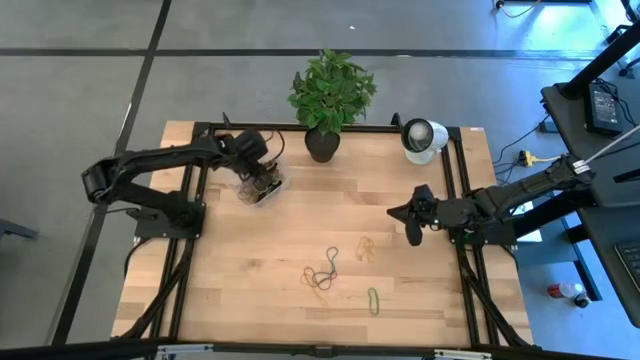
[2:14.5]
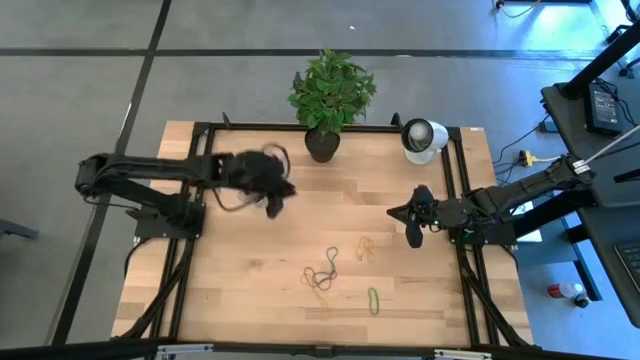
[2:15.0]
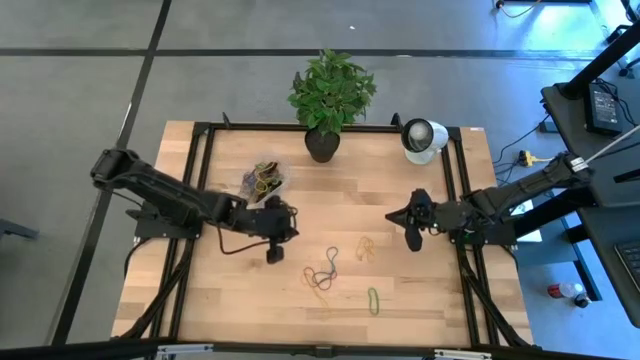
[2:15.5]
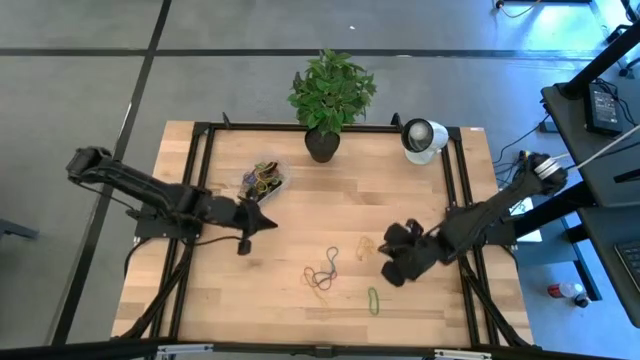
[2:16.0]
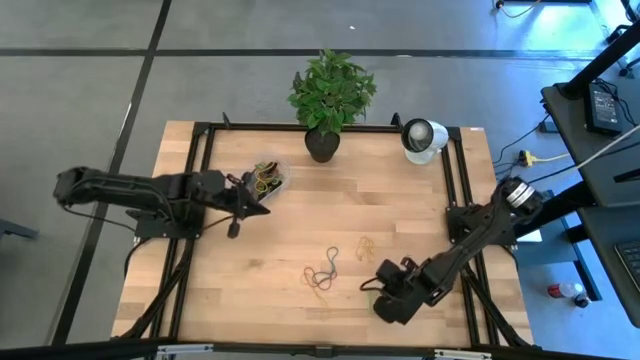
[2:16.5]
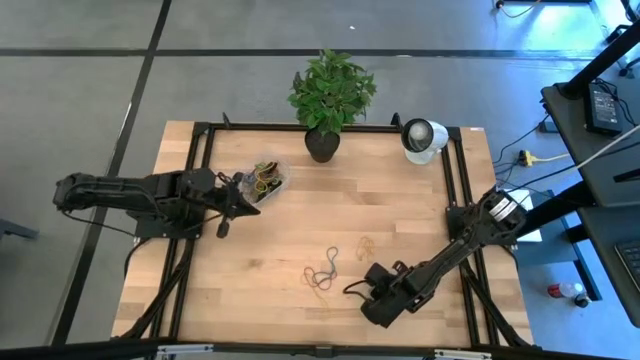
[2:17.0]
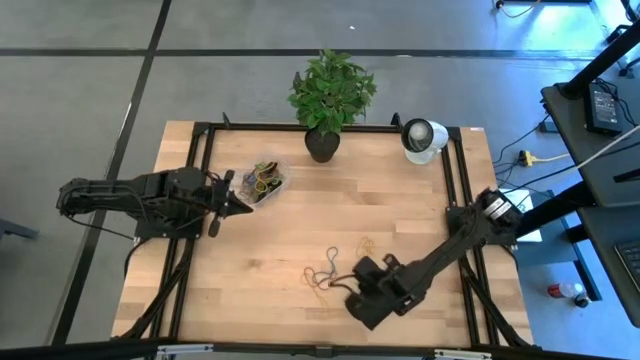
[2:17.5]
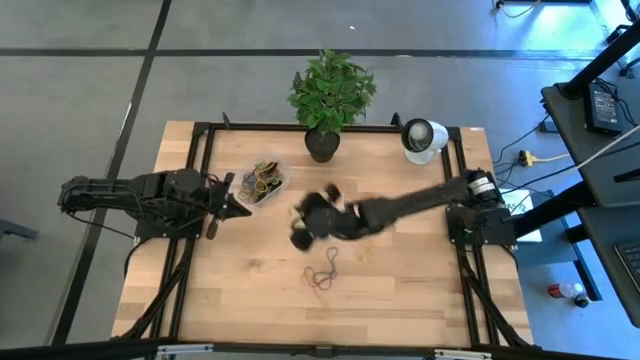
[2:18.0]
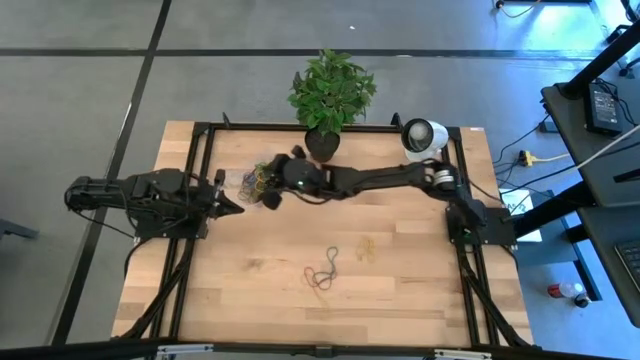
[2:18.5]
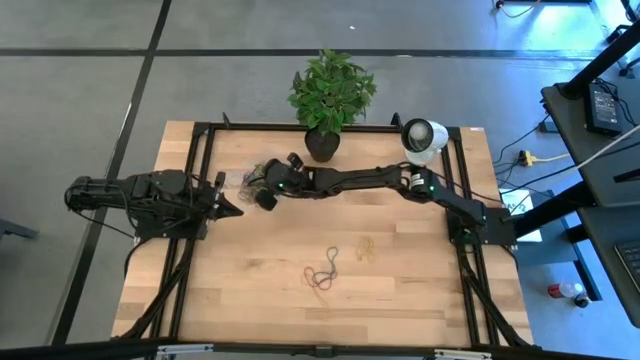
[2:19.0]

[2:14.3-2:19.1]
Task: Pick and place rubber bands into bin
Put the green rubber band into the transparent bin

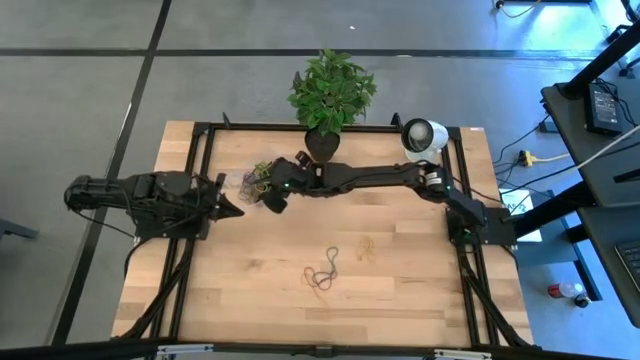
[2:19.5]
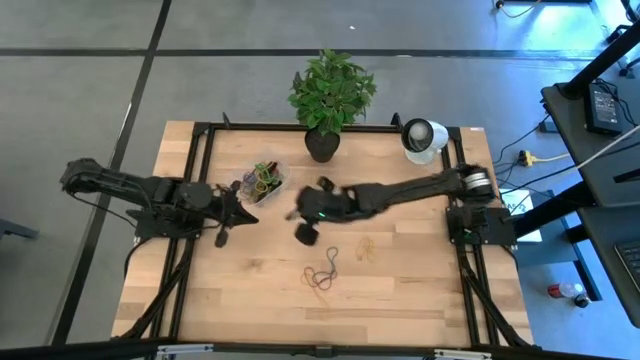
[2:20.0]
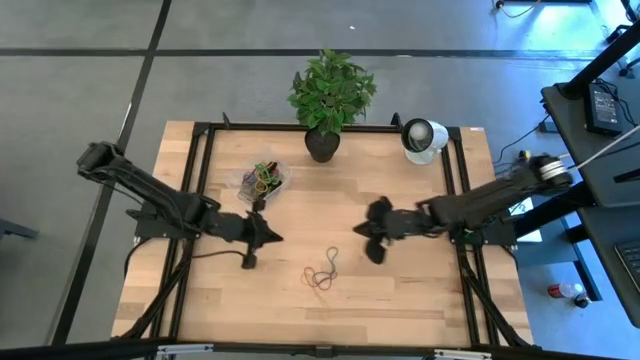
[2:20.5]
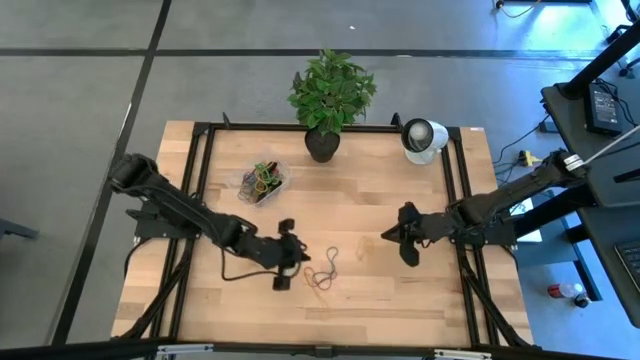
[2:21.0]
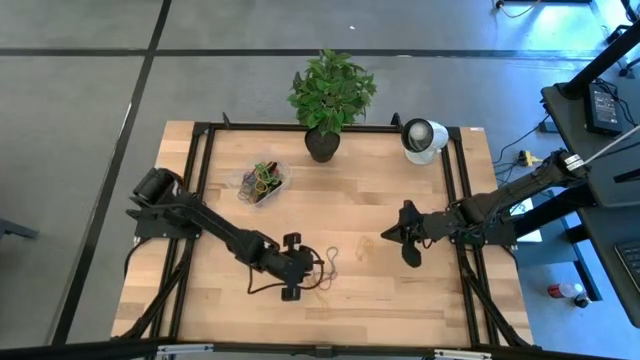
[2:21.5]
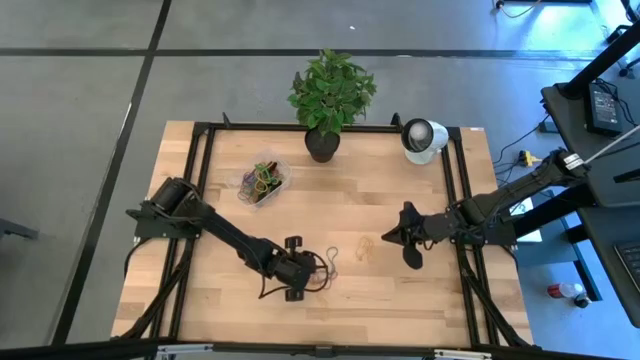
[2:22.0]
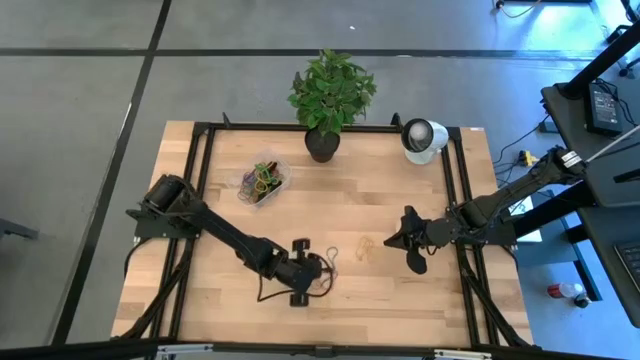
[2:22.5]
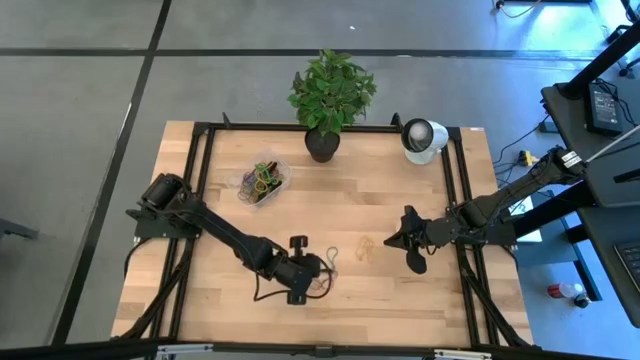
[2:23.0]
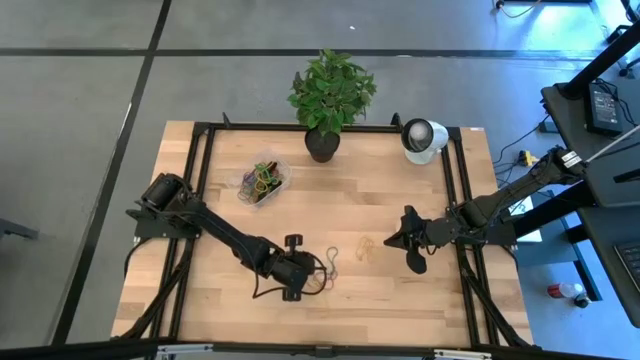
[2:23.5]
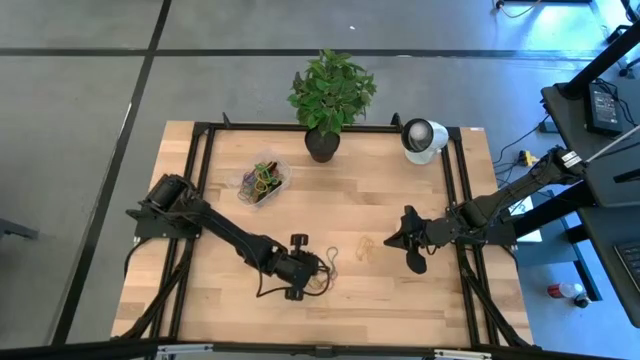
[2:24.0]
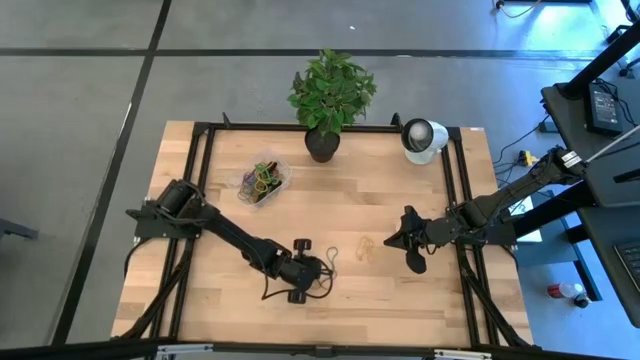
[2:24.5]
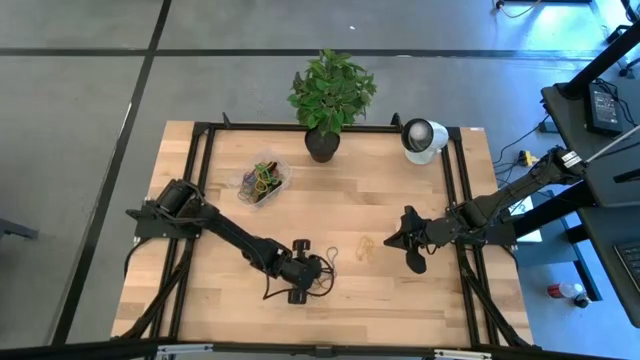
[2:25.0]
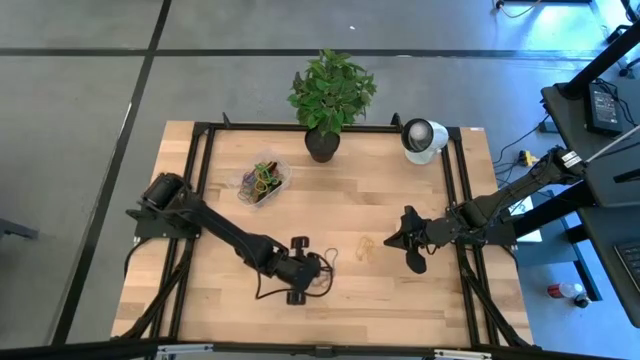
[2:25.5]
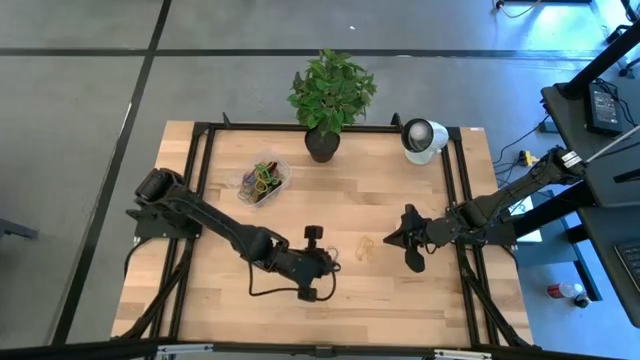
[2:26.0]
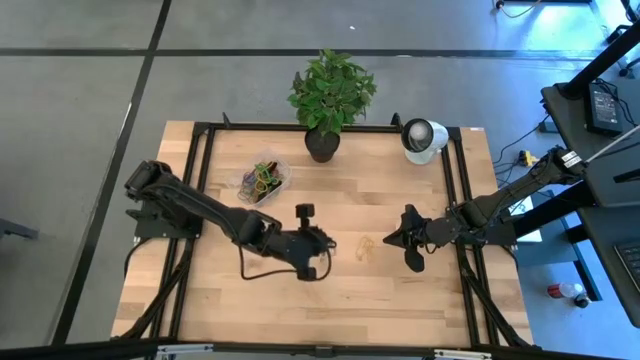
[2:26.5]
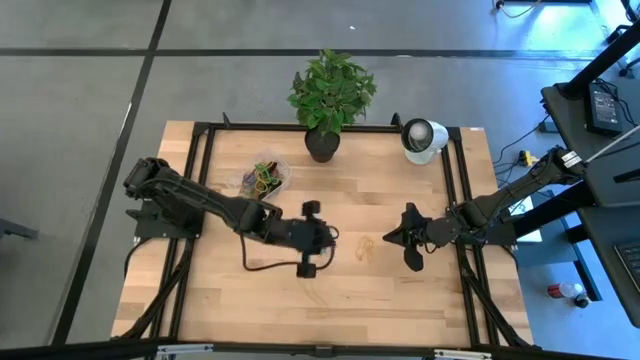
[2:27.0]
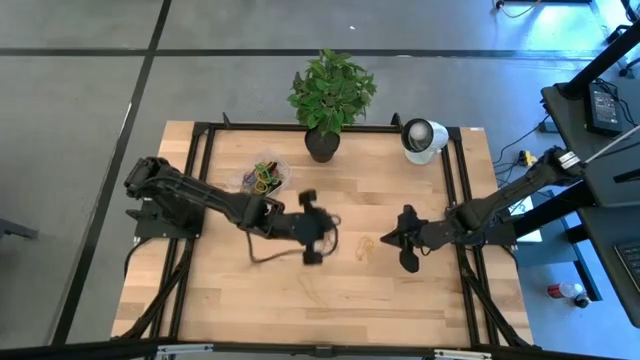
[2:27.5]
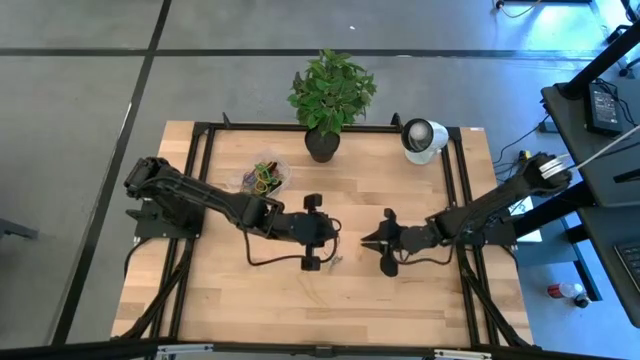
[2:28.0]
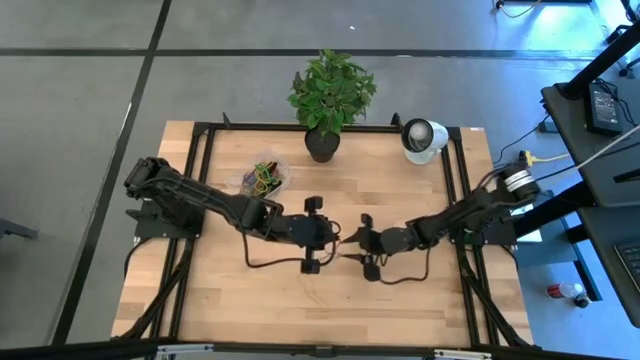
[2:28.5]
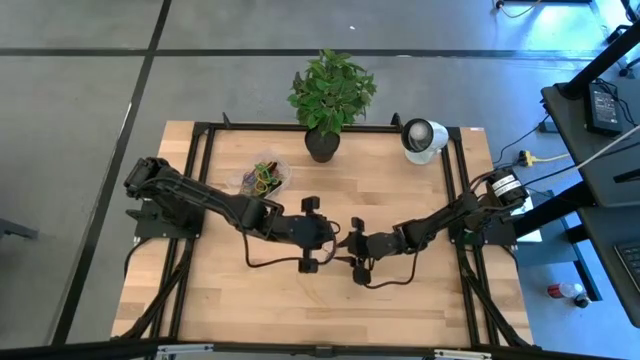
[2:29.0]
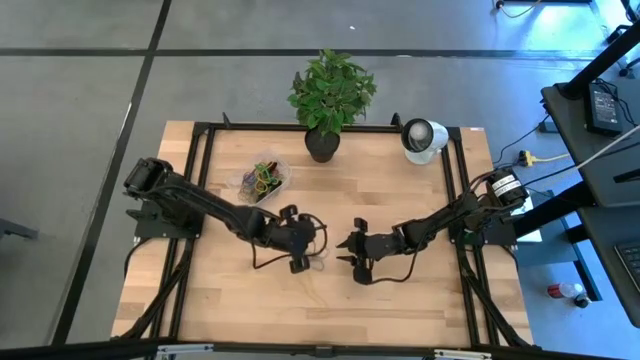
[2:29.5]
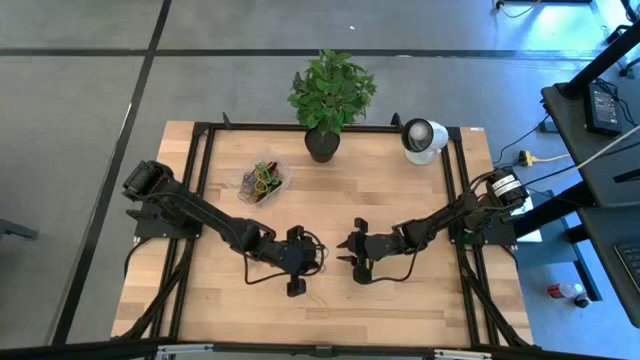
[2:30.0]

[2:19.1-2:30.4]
Put the red rubber band into the transparent bin

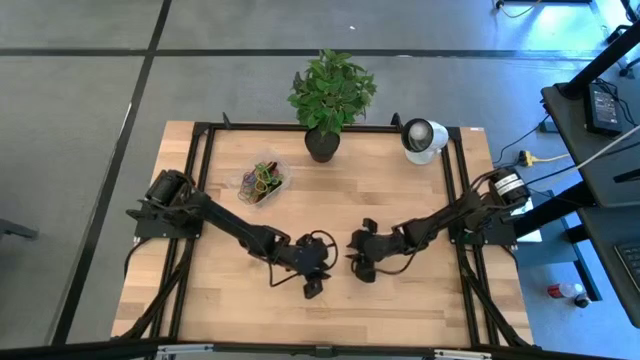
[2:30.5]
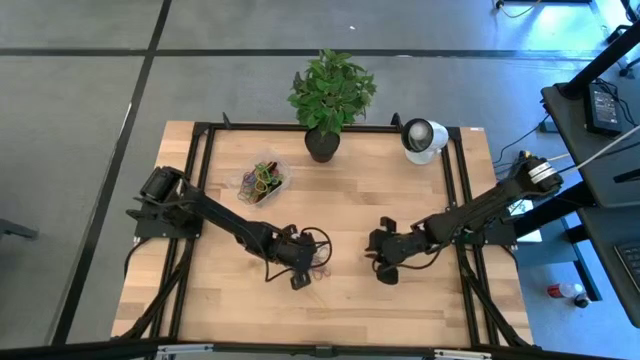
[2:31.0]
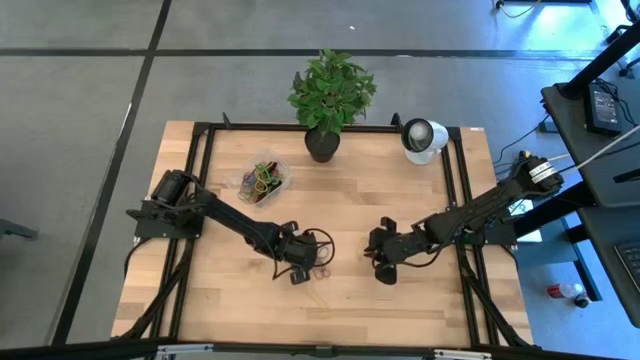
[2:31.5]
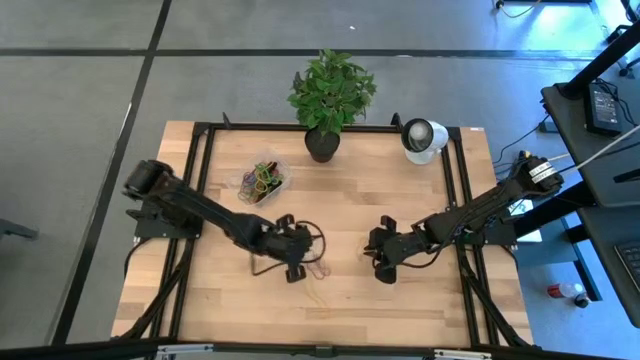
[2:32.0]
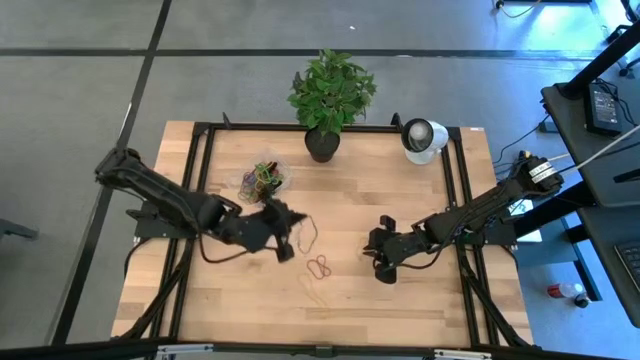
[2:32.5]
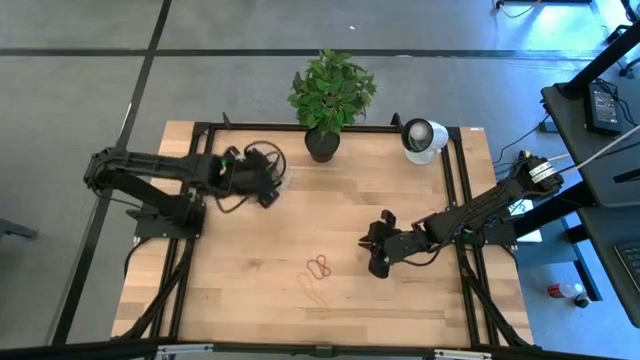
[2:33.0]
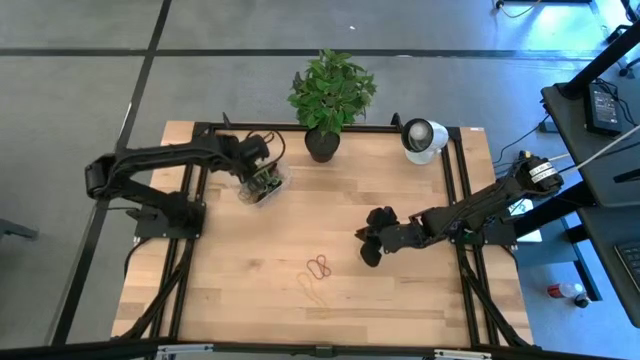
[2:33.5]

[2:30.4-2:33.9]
Put the blue rubber band into the transparent bin

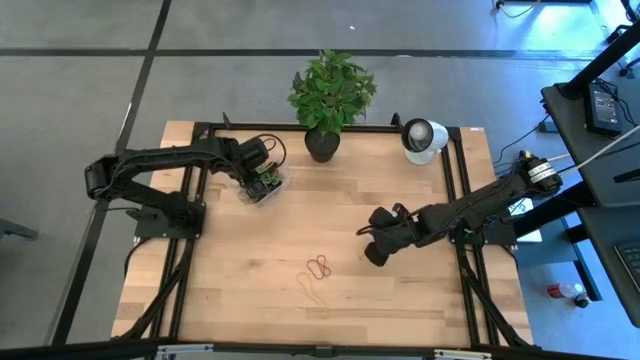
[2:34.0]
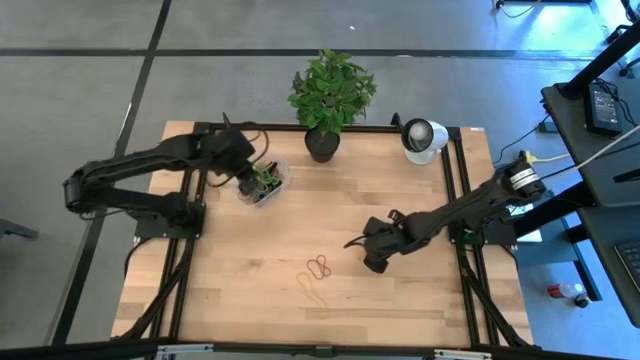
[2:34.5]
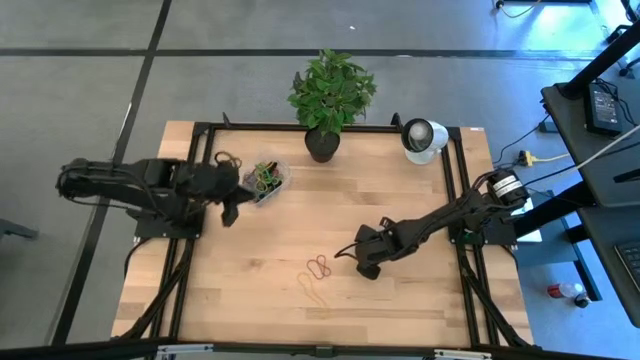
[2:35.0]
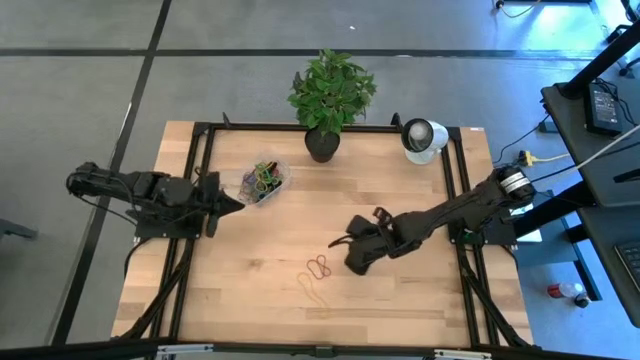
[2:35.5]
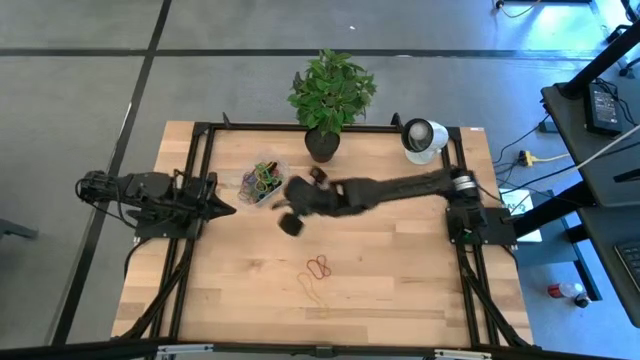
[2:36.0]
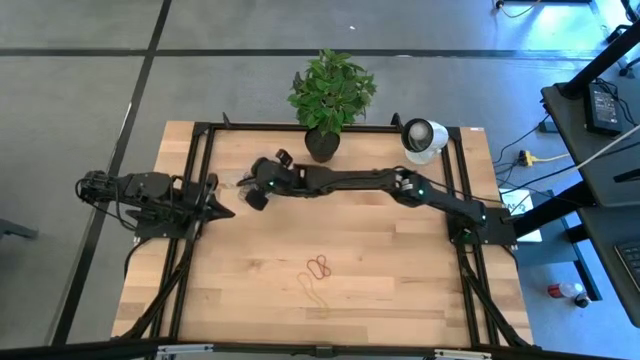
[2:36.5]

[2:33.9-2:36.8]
Put the yellow rubber band into the transparent bin
